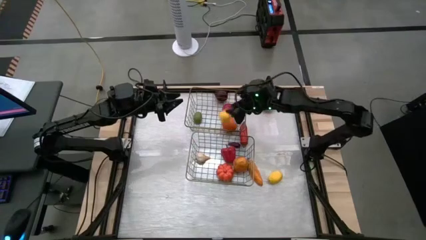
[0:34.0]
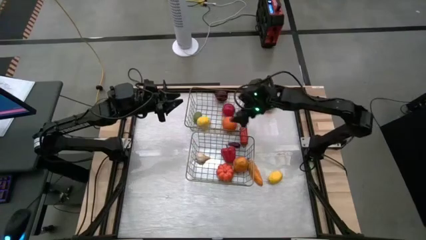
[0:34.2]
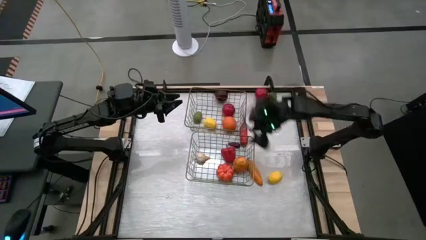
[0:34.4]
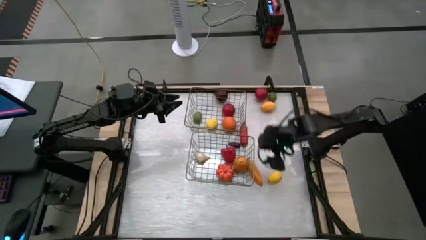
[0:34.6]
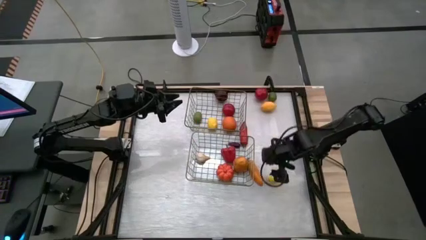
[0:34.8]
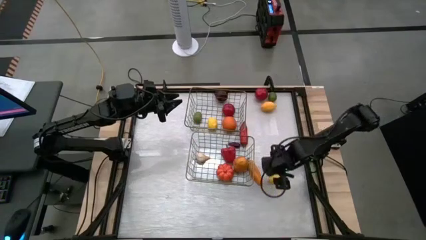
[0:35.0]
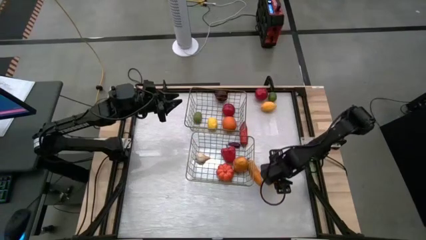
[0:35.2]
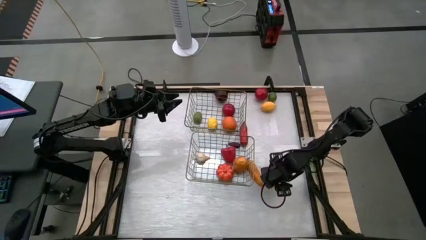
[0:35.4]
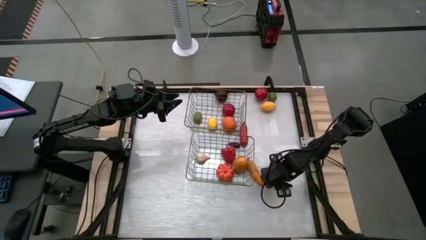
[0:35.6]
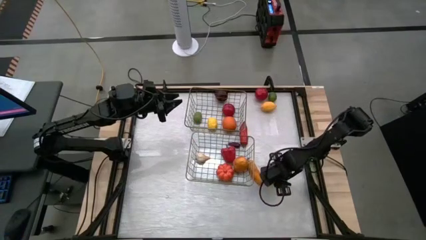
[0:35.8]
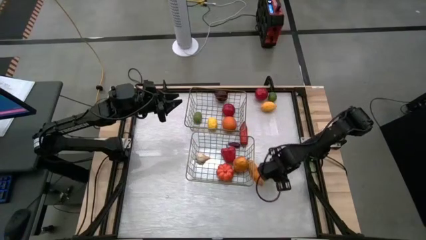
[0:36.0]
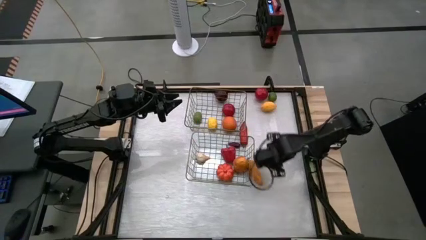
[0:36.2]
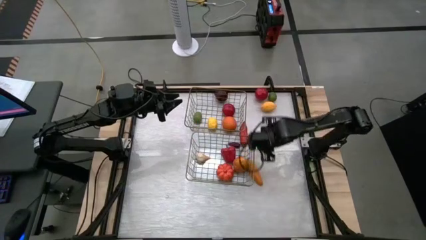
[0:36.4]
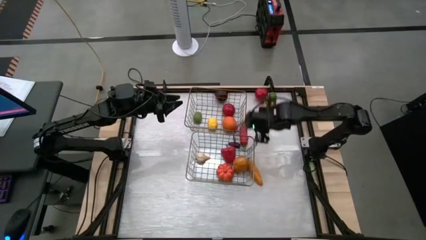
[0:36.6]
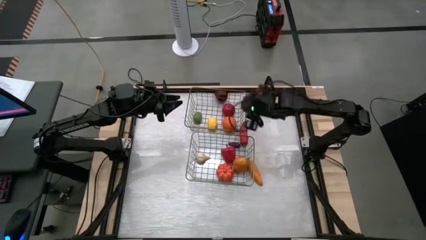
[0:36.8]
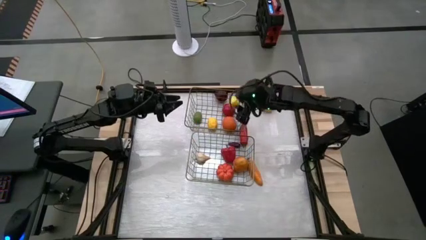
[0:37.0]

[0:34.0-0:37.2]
Task: Sort produce into baskets
Put the yellow lemon fruit into the top wire basket

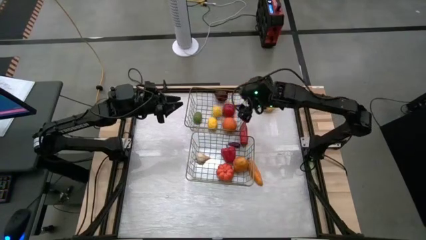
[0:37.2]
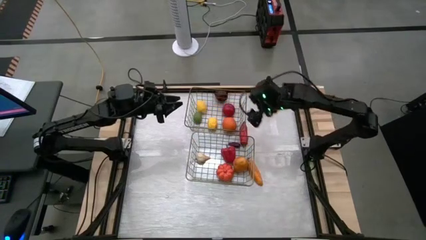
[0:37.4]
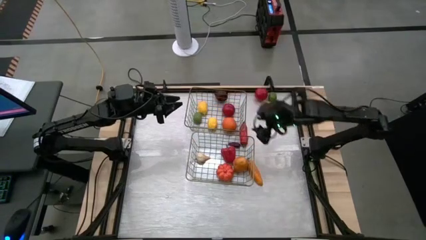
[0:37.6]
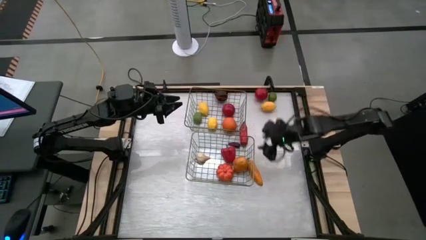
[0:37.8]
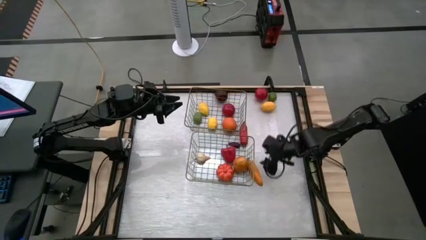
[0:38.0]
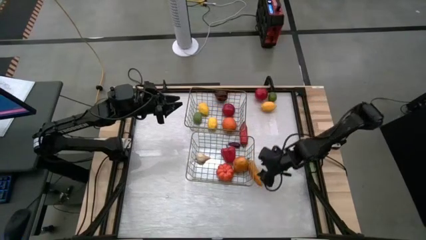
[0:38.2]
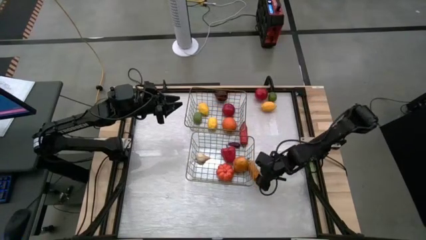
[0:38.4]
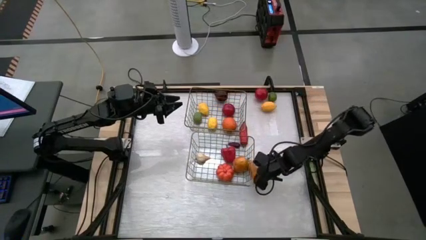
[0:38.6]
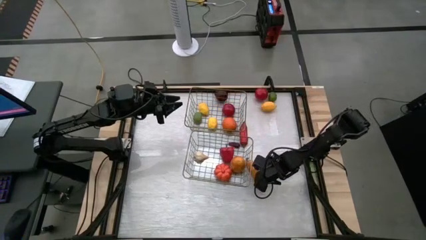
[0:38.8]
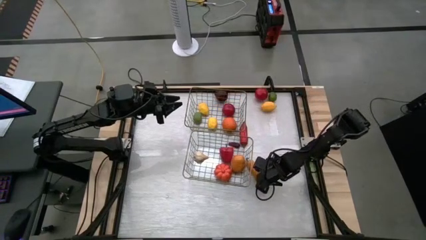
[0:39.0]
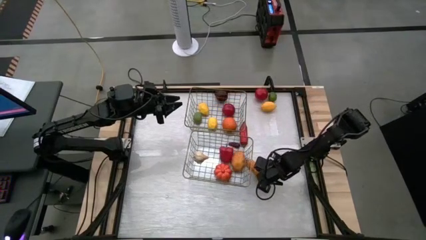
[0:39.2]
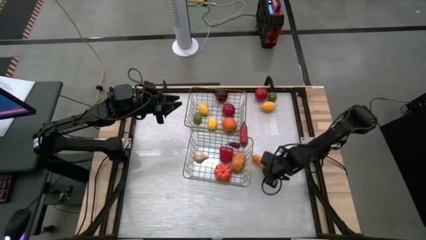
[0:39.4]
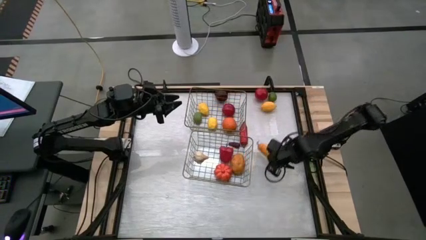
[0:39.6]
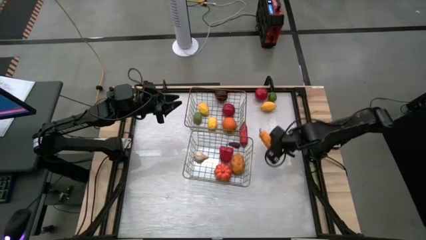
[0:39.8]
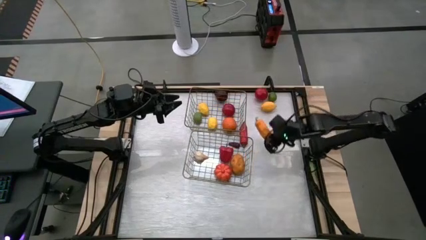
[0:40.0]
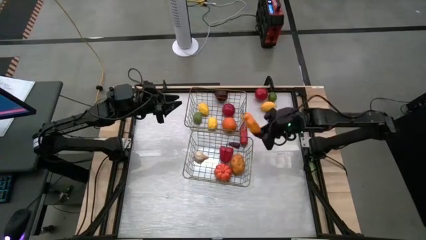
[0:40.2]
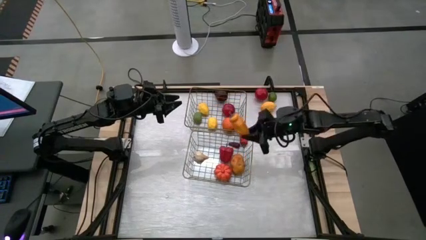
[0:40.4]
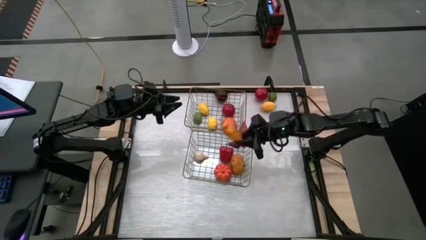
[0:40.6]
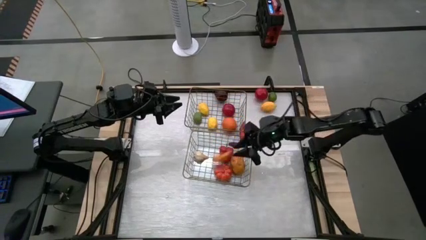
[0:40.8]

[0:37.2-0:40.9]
Put the orange chili pepper vegetable into the bottom wire basket

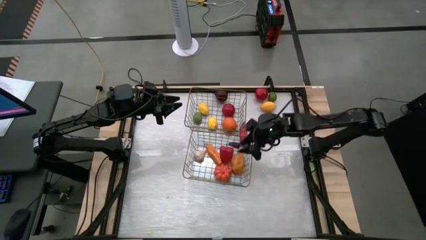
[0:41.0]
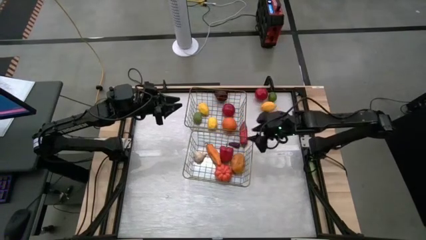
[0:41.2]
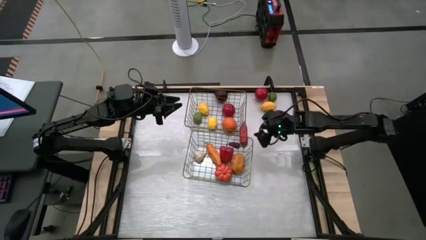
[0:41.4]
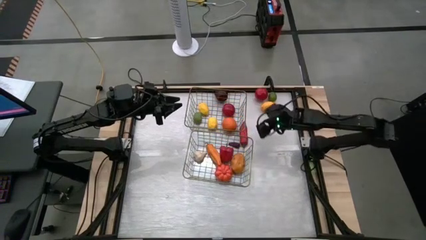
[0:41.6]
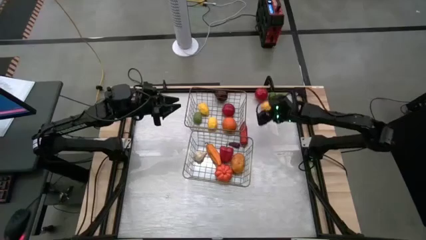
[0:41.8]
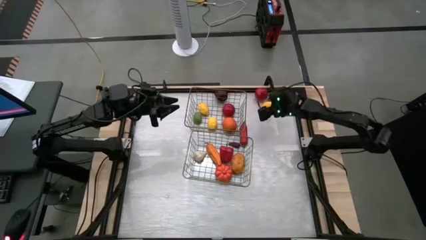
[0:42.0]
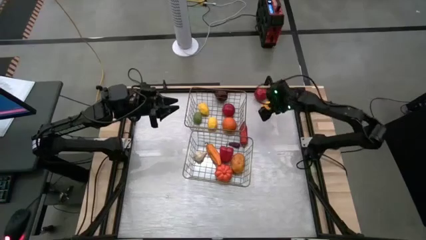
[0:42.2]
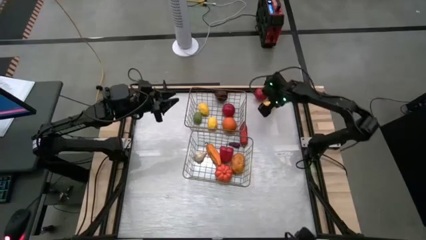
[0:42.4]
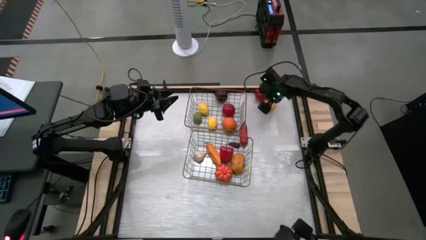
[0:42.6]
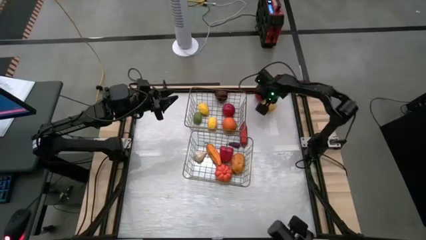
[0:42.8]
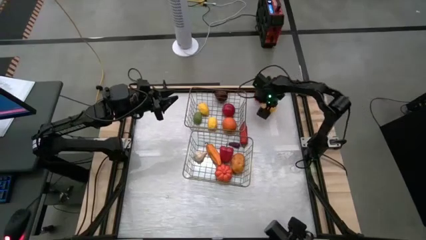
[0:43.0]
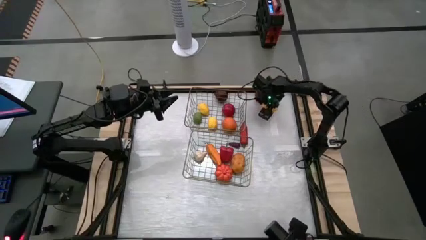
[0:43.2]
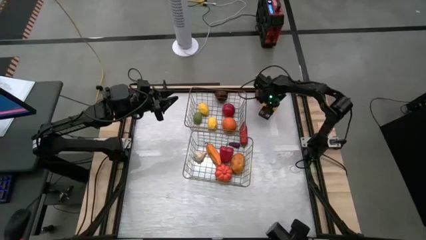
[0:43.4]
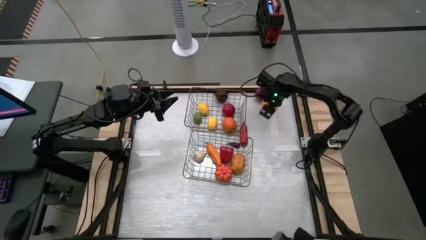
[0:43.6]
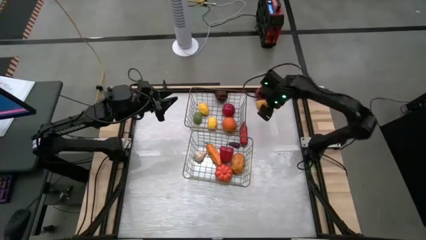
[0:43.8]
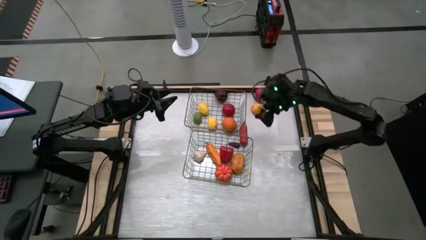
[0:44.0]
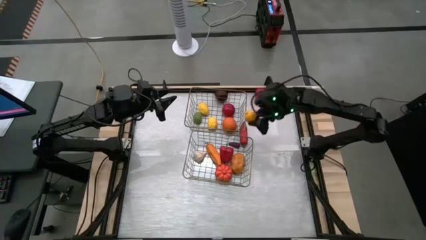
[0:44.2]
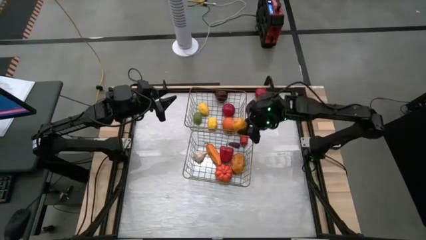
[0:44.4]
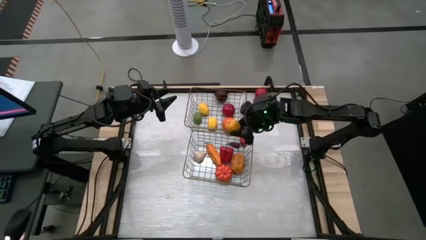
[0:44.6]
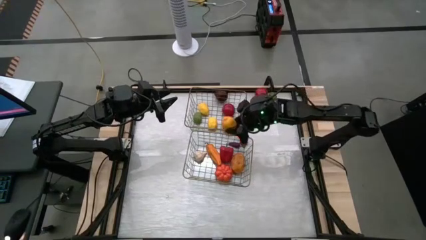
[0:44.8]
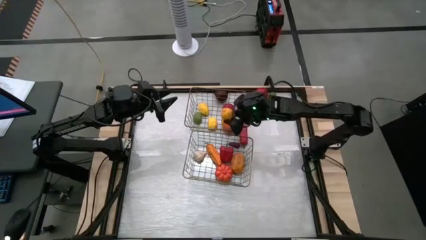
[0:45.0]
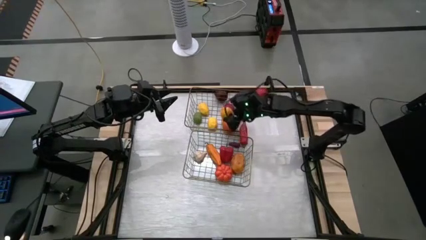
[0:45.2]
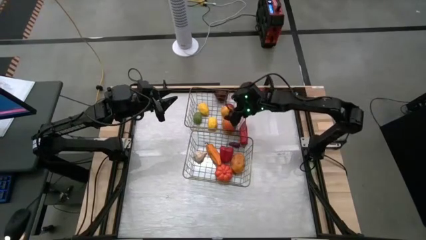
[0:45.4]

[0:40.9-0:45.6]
Put the yellow lemon fruit into the top wire basket

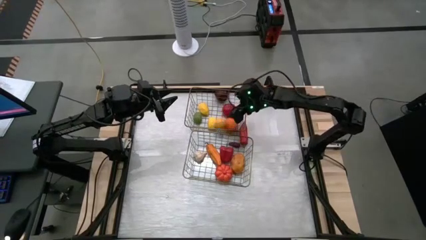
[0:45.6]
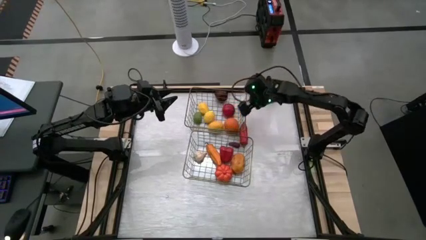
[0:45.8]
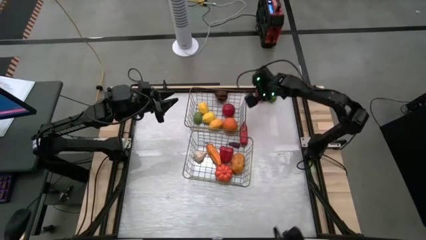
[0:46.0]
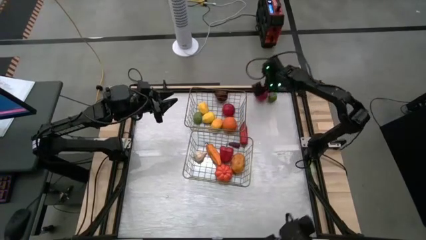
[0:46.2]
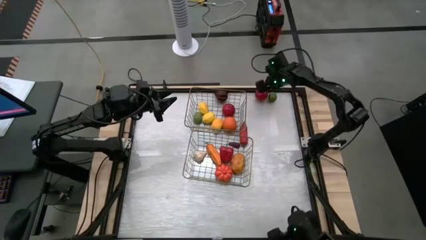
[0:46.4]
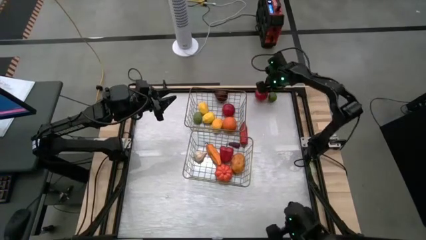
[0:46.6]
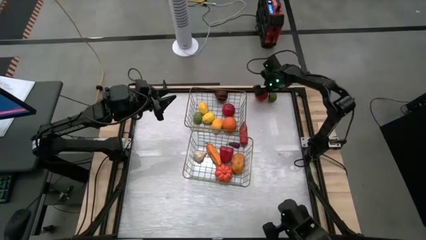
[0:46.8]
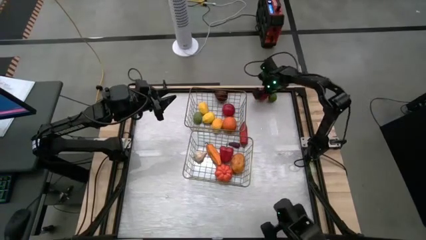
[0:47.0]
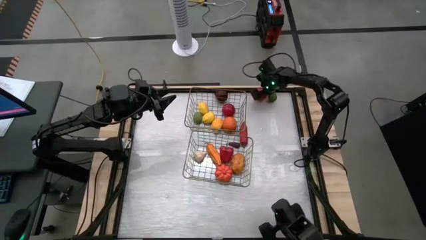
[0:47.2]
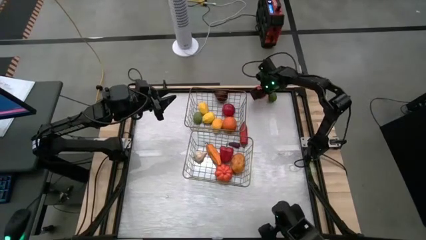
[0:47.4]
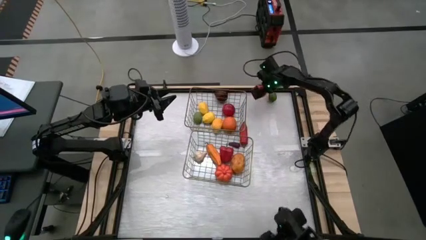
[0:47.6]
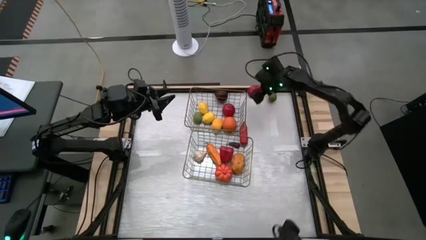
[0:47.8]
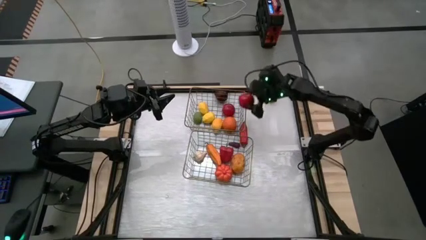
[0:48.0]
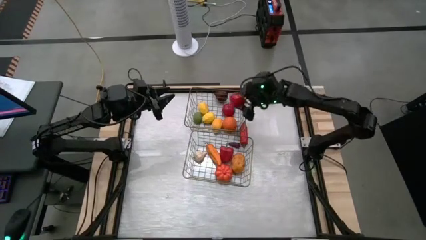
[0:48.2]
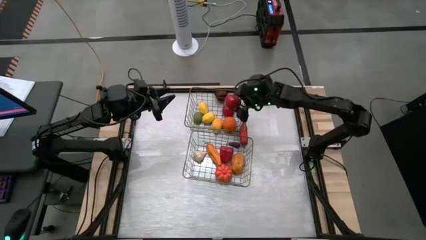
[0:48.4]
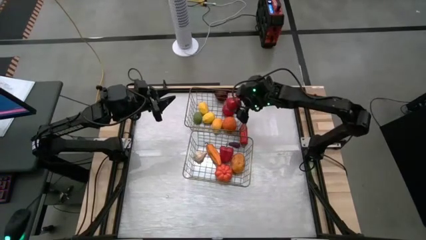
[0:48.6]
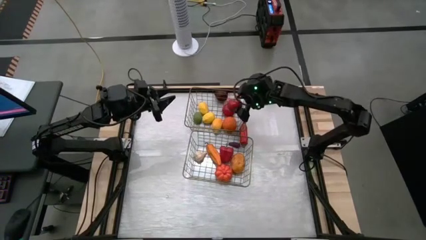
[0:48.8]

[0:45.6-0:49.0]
Put the red tomato fruit into the top wire basket

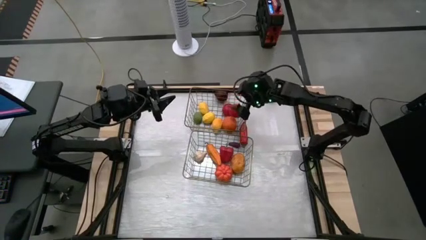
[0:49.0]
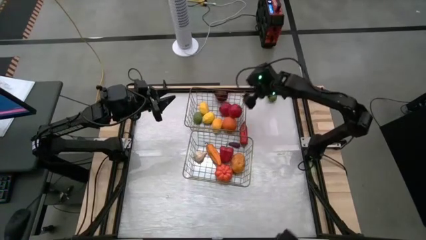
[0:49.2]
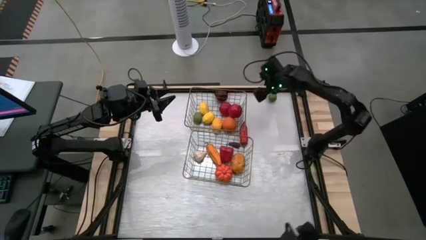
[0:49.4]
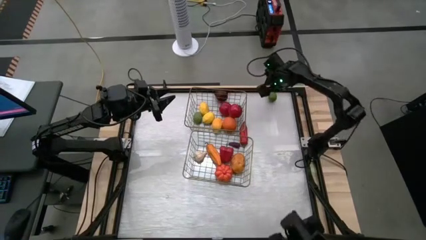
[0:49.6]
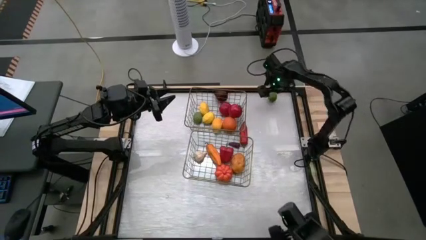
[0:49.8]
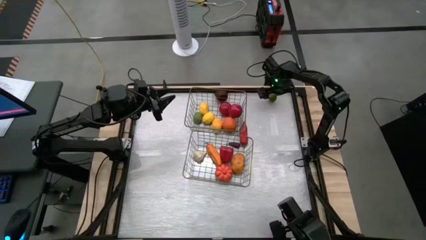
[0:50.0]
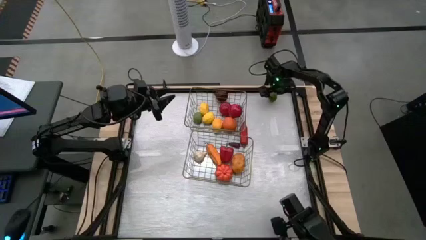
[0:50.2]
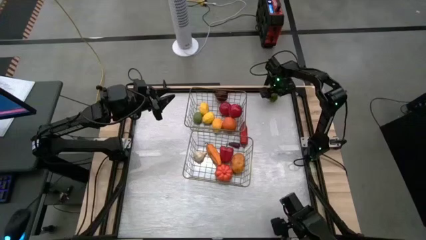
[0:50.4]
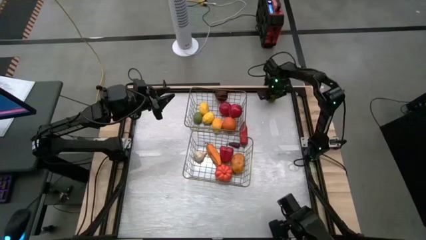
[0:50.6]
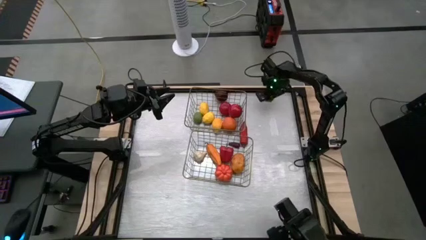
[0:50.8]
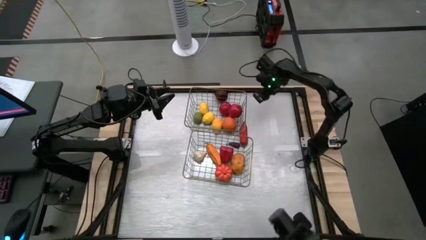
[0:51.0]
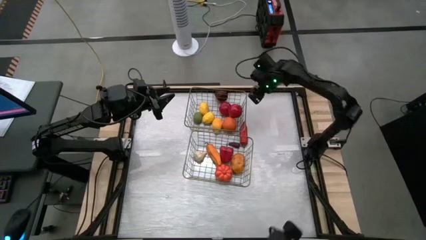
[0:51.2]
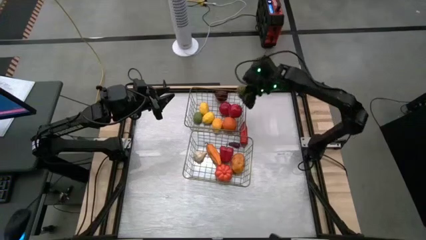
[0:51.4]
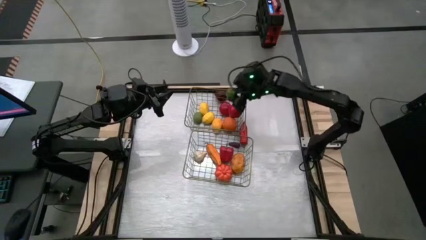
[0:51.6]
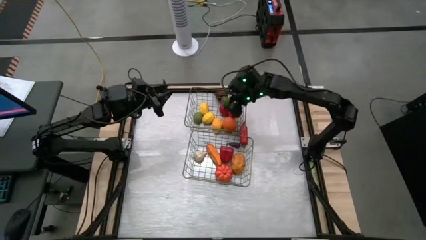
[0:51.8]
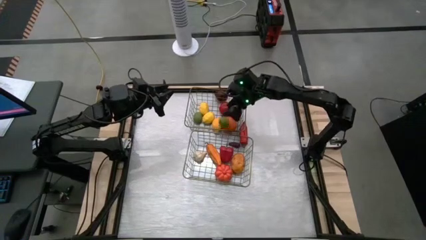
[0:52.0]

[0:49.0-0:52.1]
Put the green lime fruit into the top wire basket
